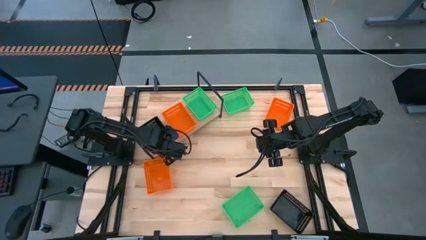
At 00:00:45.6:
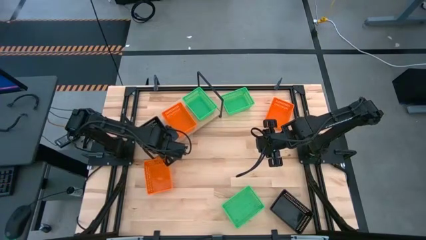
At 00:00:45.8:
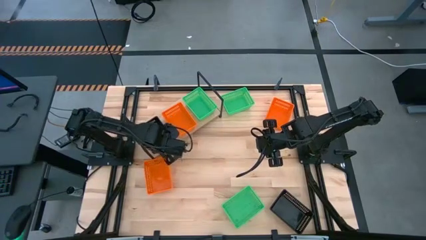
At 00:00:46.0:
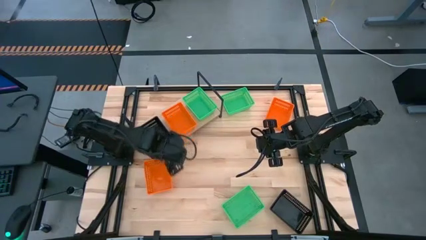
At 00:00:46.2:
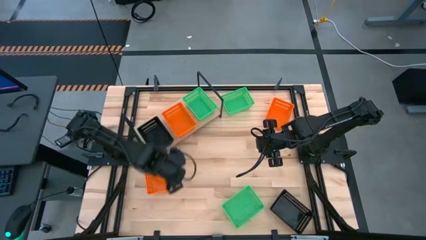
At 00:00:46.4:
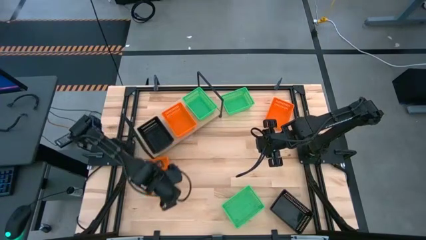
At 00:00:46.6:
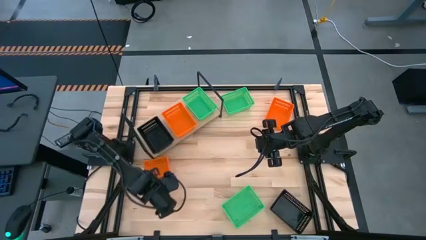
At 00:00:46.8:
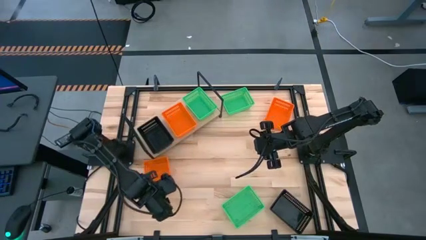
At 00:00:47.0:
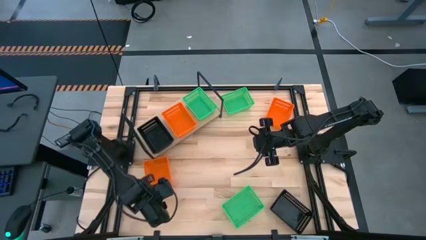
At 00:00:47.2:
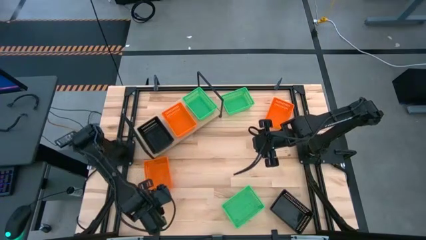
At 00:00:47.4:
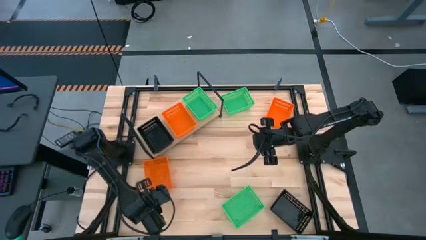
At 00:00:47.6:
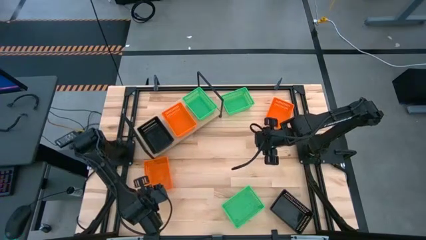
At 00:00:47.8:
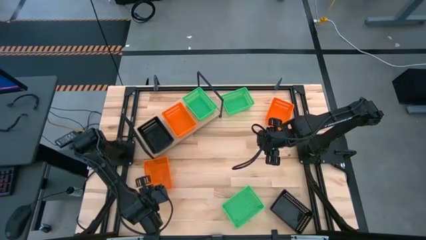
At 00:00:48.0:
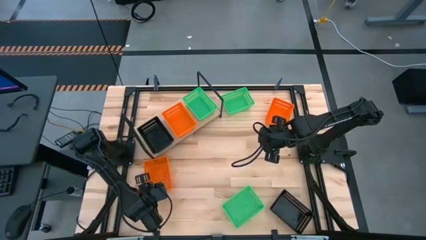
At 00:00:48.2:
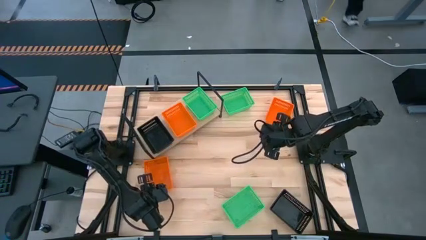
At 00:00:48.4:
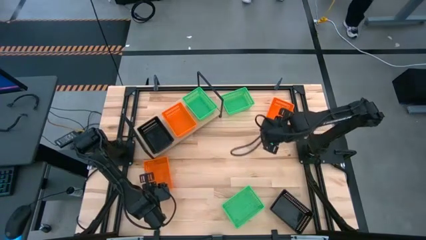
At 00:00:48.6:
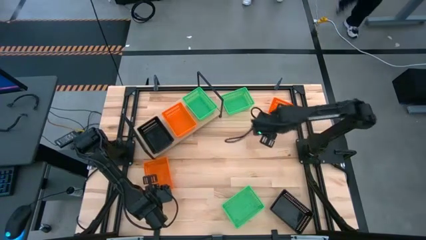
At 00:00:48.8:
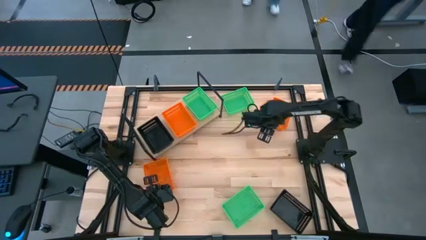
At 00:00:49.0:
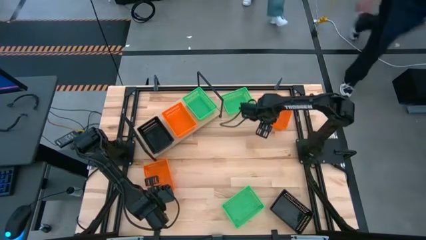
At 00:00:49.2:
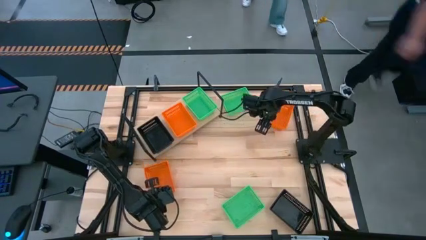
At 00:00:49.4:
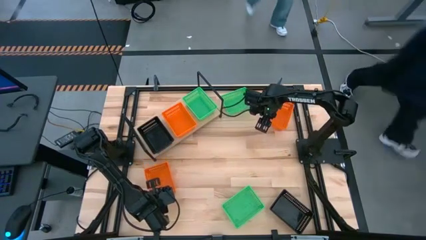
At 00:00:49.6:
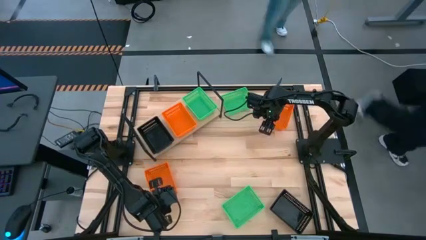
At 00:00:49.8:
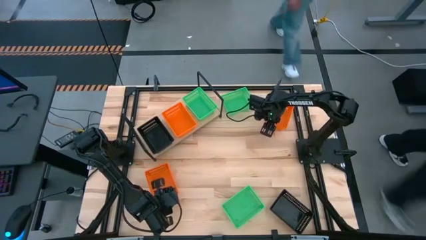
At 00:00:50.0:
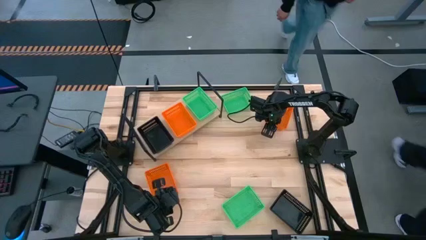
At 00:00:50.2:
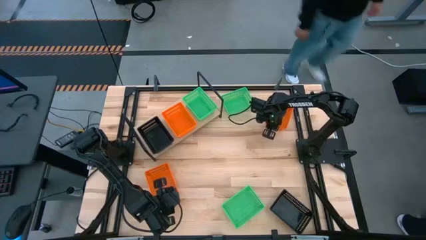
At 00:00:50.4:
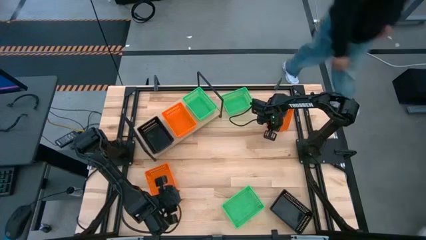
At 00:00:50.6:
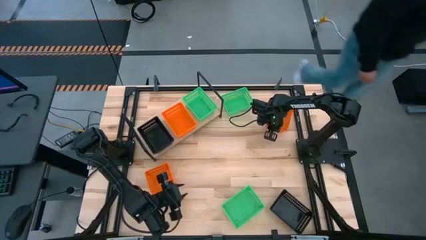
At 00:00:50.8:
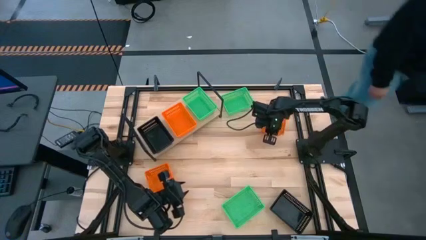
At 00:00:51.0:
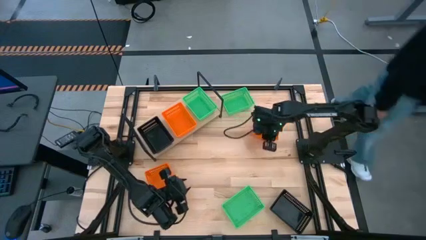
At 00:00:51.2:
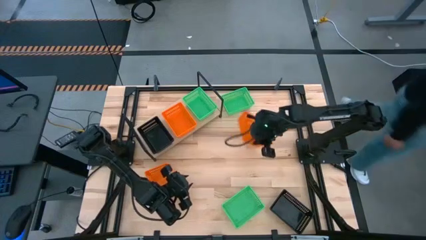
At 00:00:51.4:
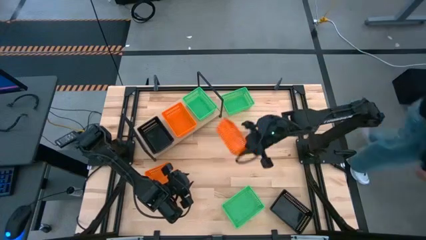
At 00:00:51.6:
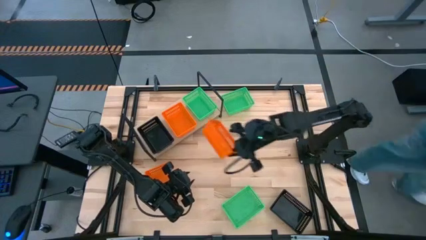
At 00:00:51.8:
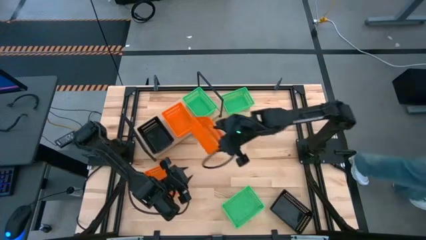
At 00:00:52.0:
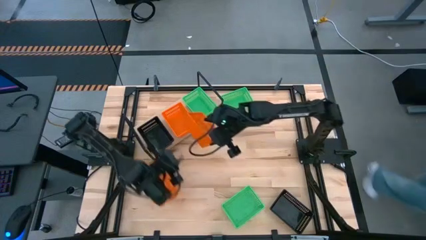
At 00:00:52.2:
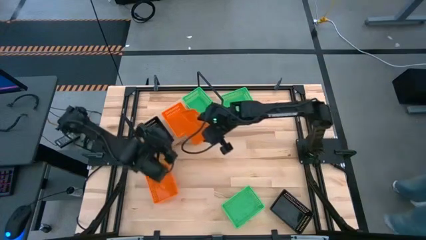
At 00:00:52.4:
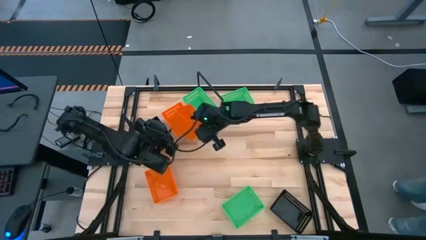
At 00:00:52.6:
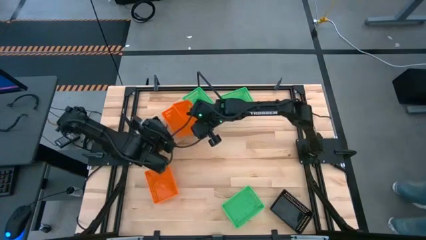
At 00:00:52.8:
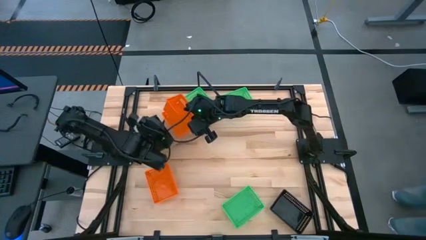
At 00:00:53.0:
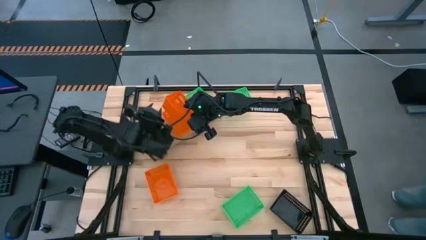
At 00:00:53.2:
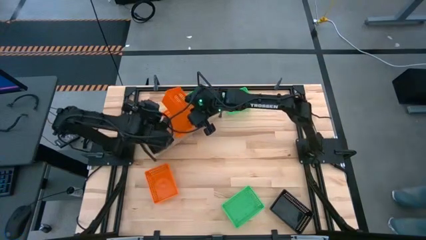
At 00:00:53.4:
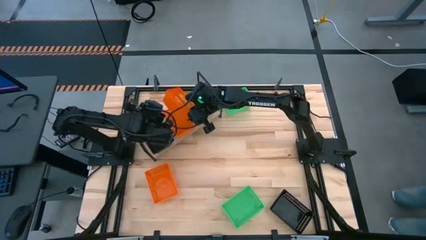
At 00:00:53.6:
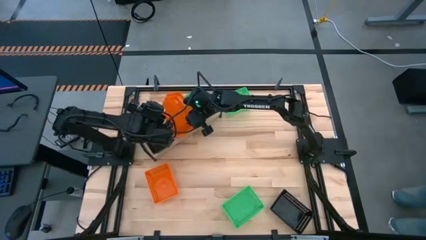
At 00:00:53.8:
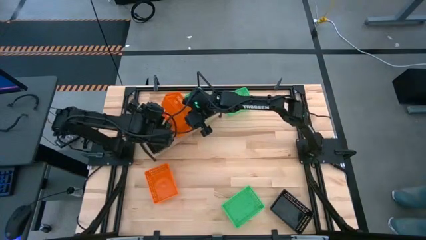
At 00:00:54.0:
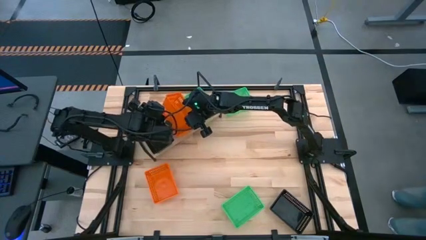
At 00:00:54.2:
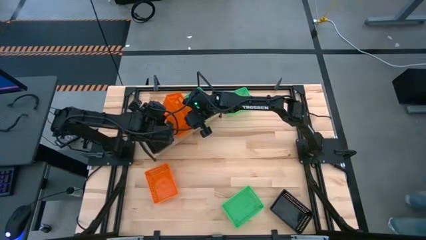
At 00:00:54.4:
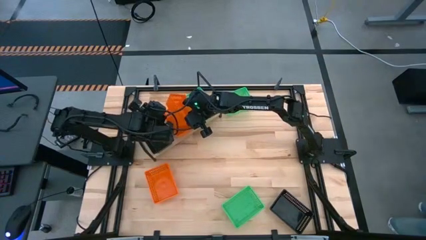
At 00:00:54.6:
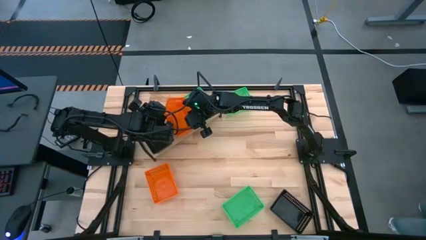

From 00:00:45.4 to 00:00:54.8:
Task: Stack baskets on shelf by color
Stack the right orange bin on top of the orange bin on the shelf
